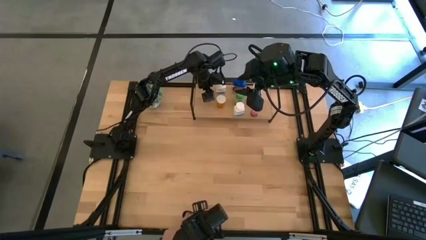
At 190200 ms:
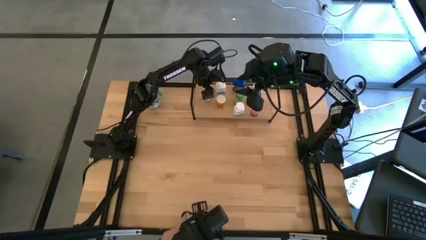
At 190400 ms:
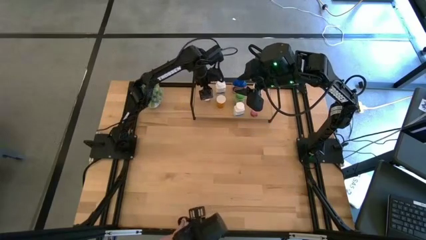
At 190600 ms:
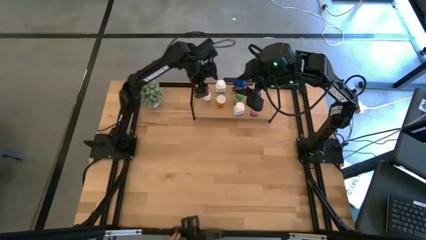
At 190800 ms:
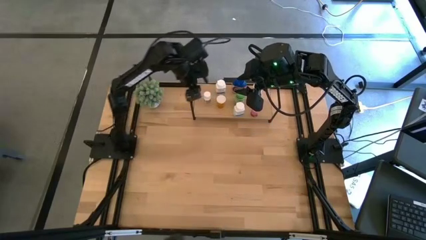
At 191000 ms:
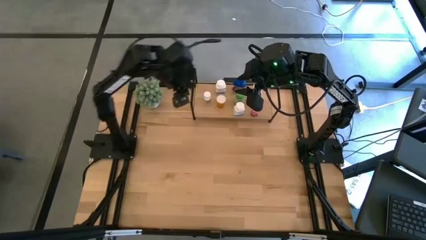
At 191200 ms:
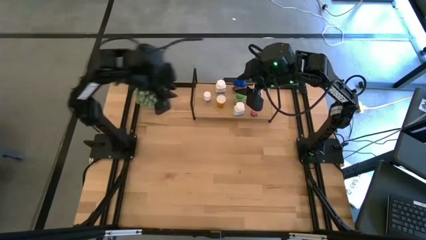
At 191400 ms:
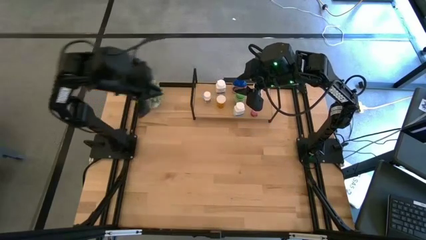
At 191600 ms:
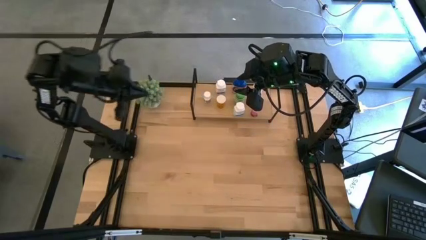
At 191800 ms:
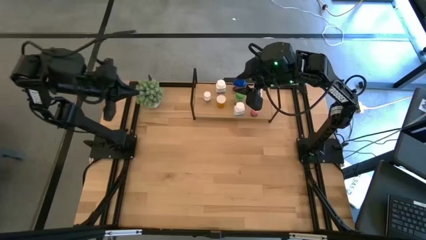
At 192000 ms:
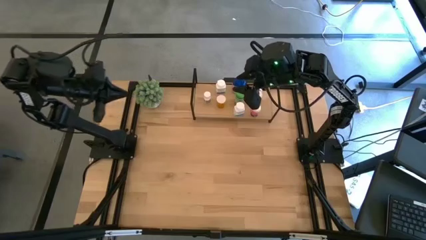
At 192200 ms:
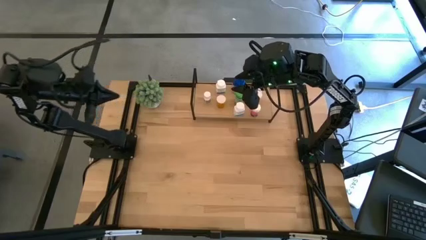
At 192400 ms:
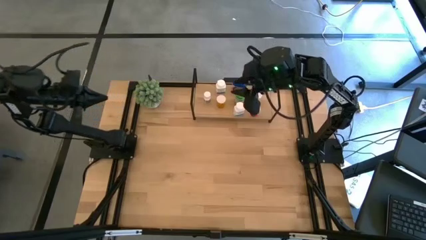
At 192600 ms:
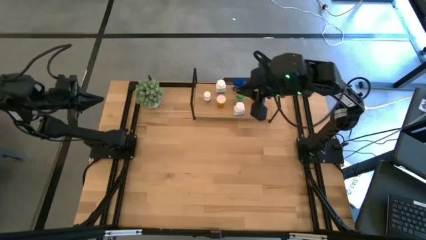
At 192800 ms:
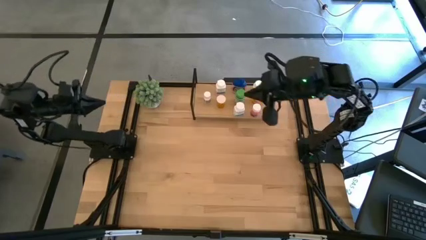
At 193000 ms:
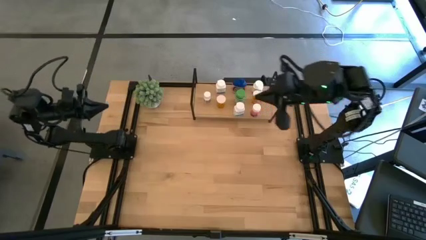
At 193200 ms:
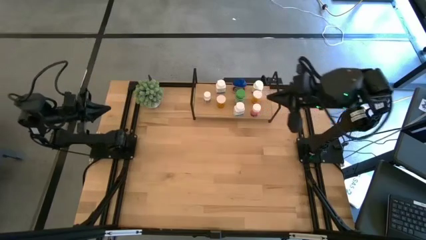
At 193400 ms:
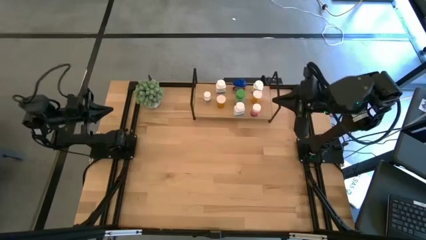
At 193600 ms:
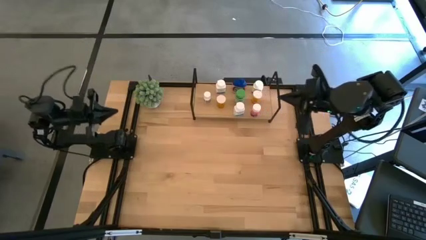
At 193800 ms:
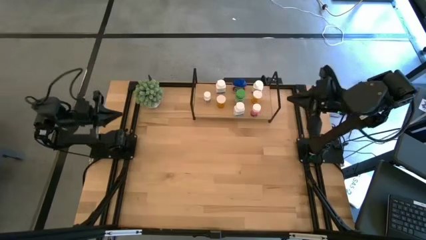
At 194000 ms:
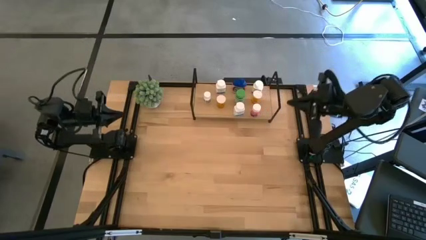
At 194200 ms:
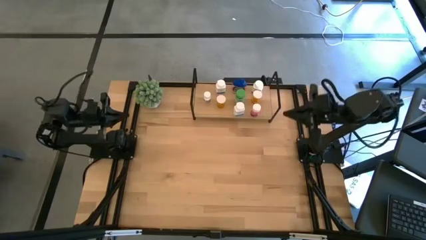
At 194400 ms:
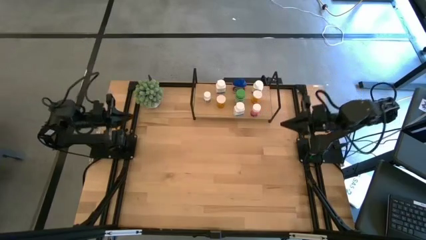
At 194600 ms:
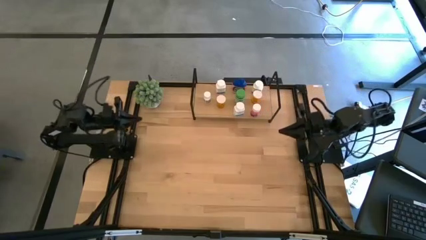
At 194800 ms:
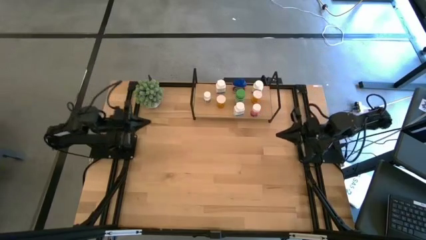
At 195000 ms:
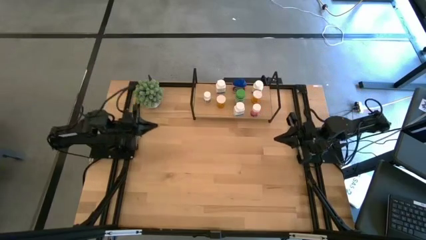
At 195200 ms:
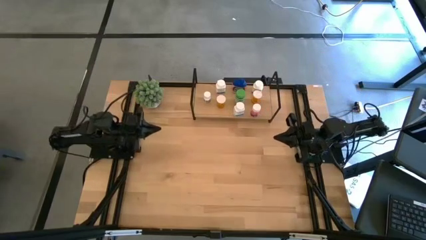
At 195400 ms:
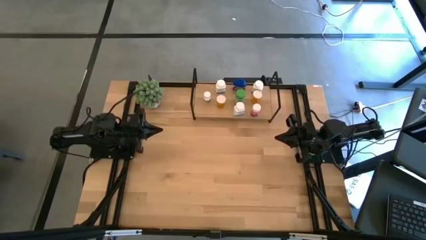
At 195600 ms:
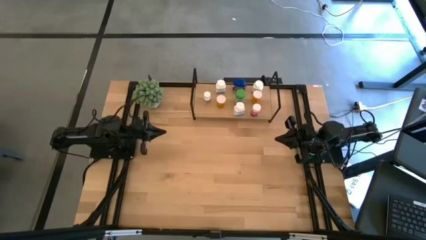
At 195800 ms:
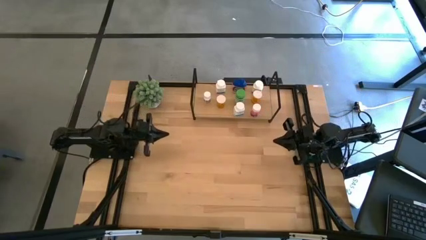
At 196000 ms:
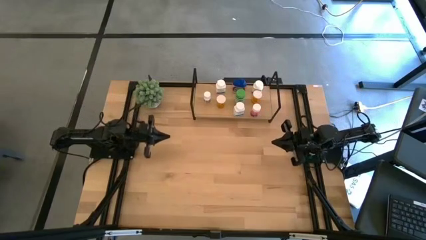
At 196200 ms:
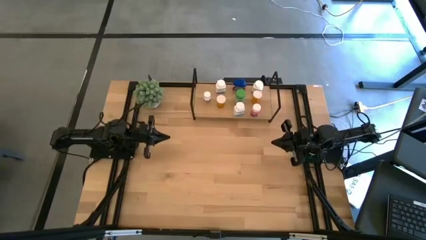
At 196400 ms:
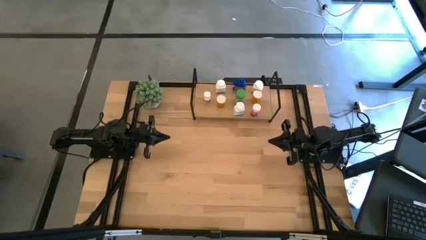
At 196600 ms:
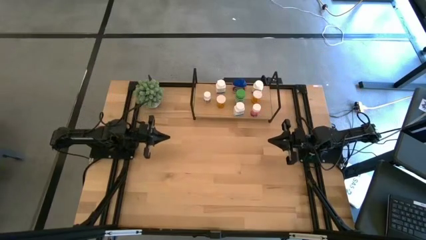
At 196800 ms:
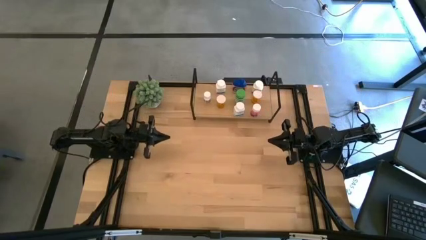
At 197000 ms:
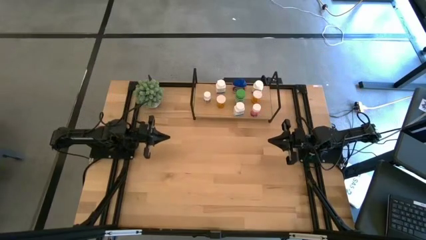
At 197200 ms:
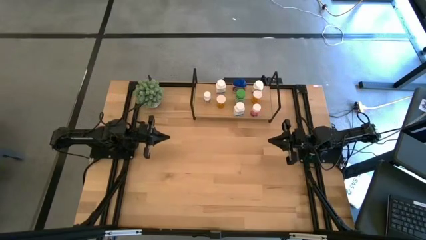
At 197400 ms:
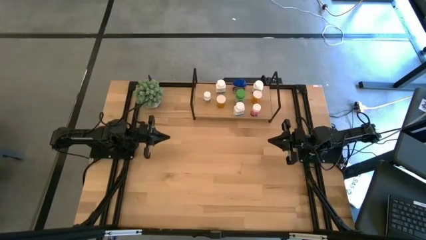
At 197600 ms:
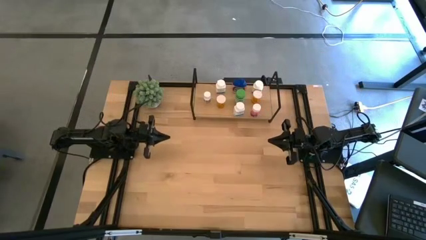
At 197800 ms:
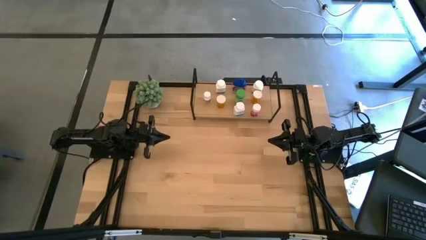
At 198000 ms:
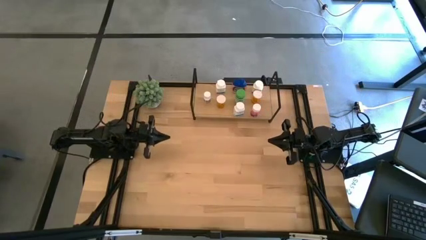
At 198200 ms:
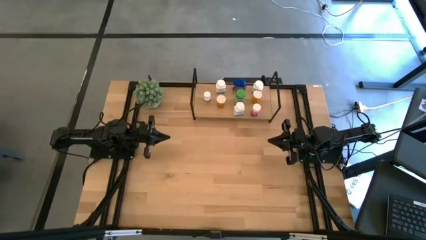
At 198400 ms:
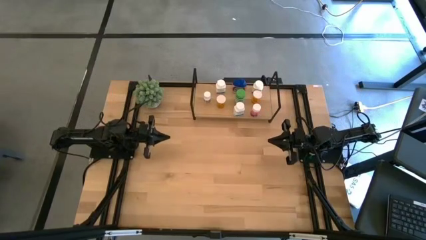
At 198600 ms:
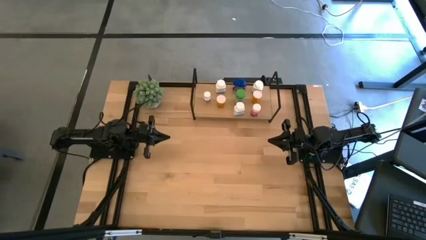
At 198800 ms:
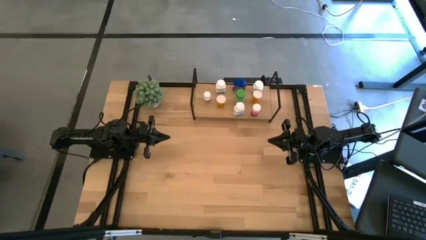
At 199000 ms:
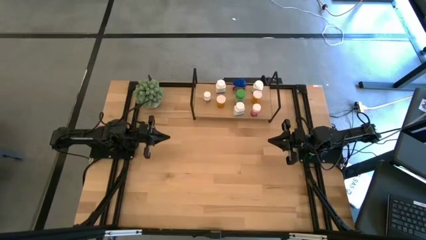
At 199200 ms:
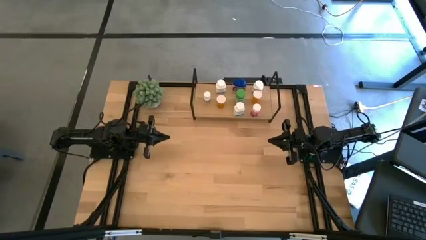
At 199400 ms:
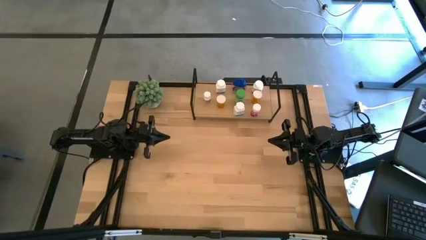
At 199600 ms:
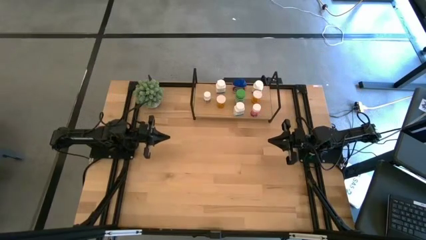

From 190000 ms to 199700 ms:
Task: Pick and place medicine bottles onto shelf by color
Return to Home Position

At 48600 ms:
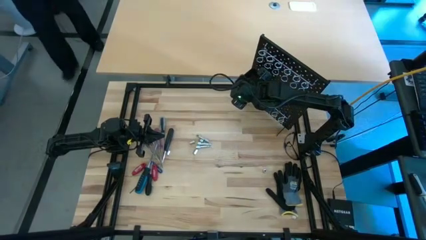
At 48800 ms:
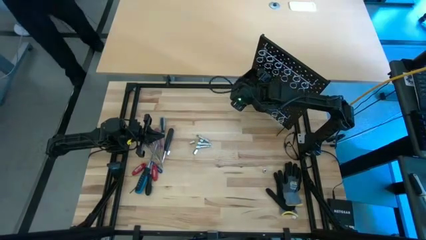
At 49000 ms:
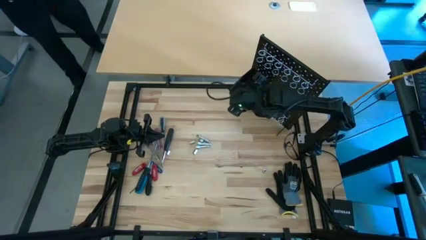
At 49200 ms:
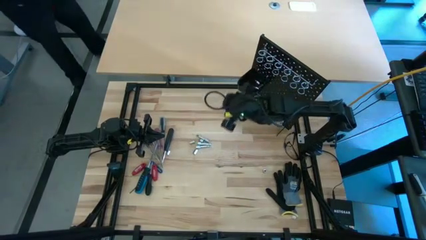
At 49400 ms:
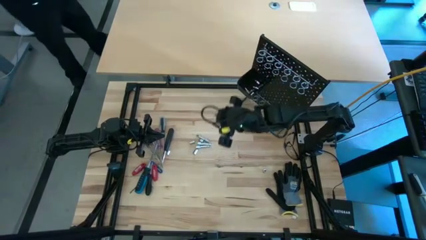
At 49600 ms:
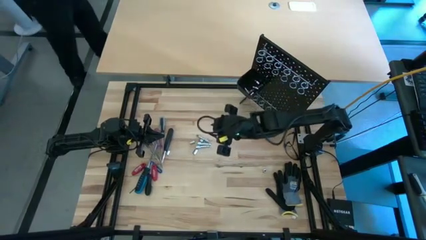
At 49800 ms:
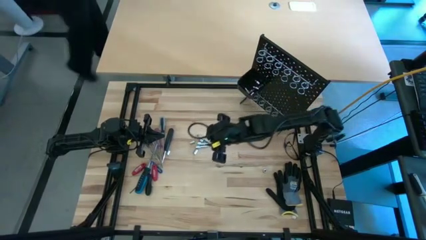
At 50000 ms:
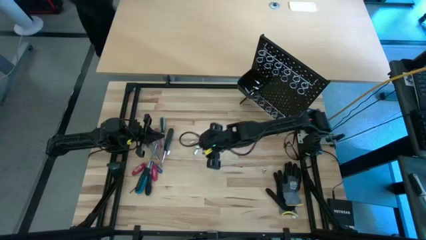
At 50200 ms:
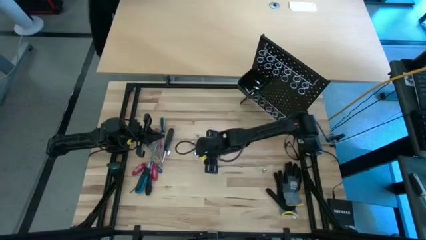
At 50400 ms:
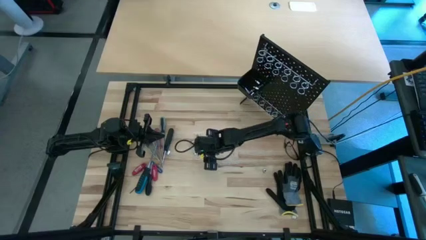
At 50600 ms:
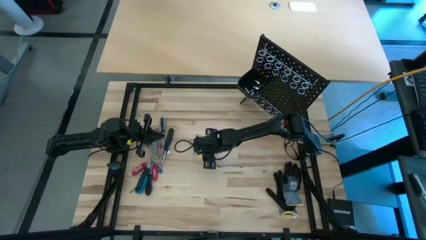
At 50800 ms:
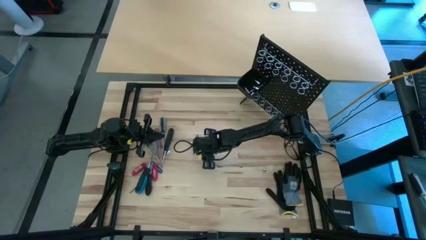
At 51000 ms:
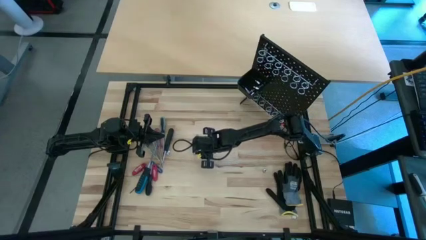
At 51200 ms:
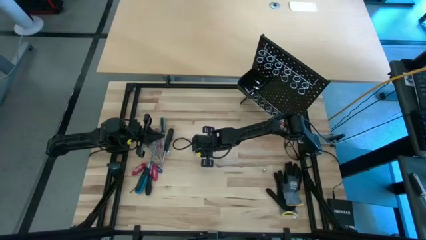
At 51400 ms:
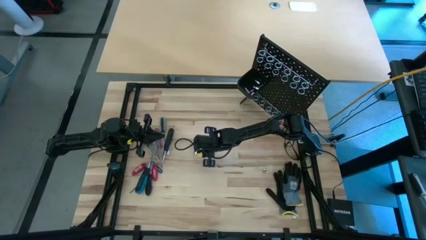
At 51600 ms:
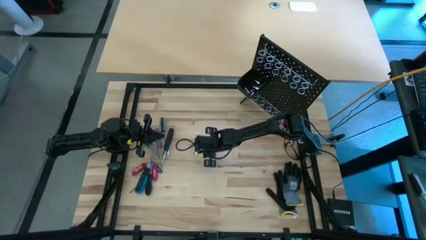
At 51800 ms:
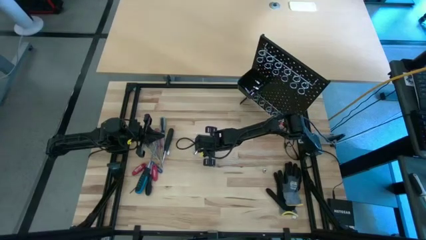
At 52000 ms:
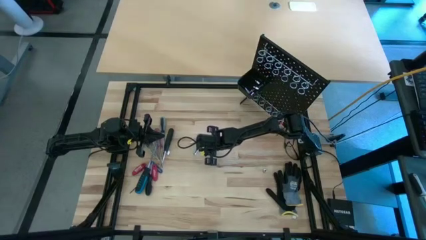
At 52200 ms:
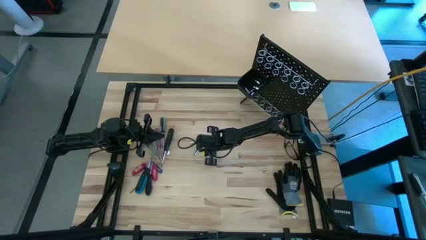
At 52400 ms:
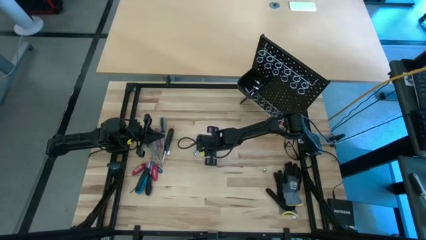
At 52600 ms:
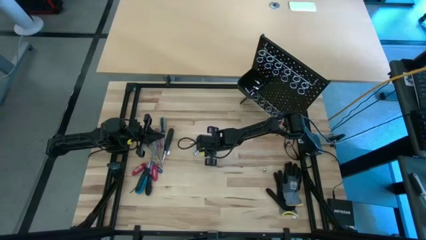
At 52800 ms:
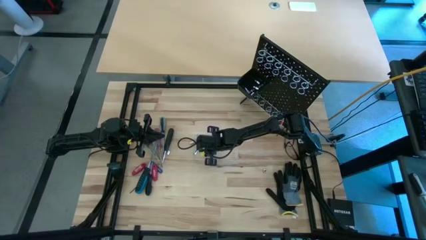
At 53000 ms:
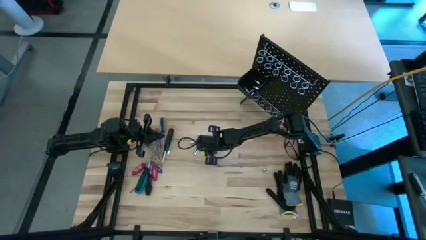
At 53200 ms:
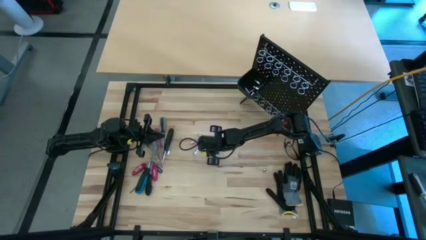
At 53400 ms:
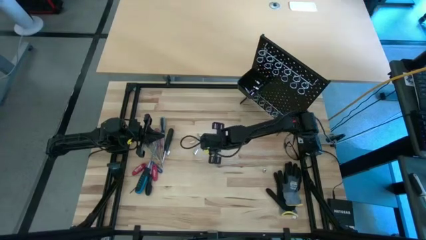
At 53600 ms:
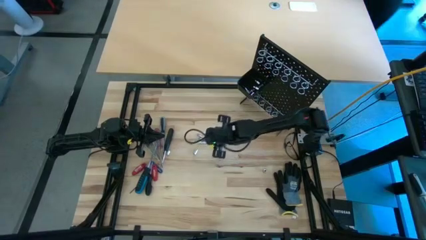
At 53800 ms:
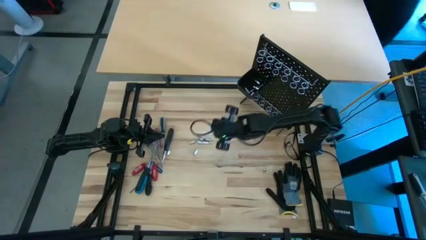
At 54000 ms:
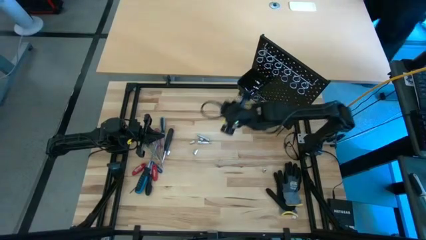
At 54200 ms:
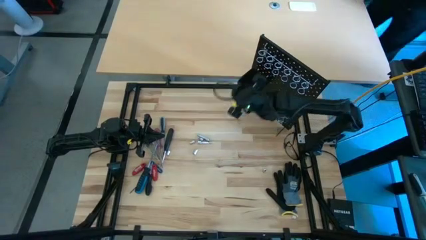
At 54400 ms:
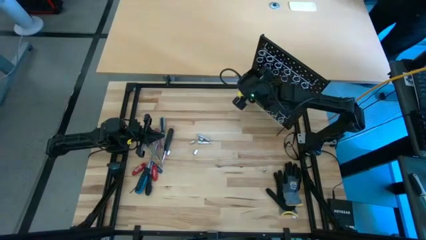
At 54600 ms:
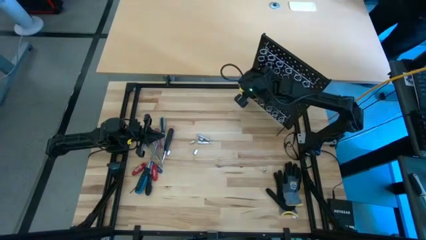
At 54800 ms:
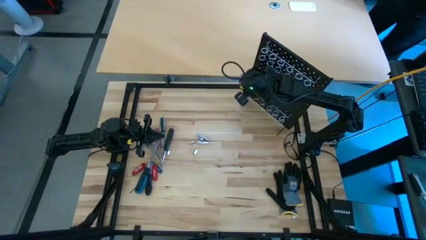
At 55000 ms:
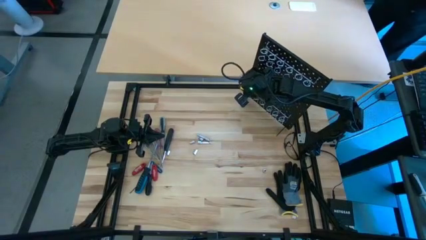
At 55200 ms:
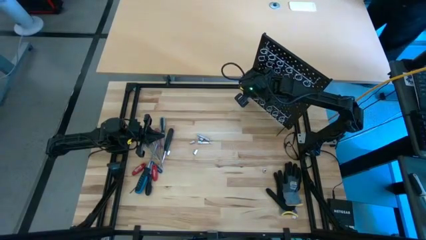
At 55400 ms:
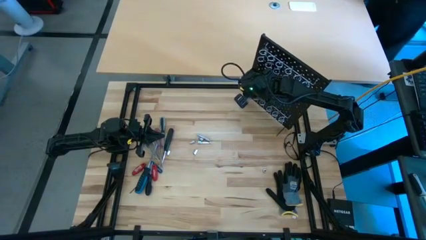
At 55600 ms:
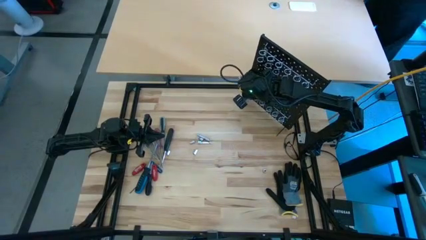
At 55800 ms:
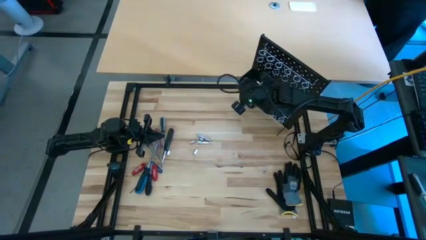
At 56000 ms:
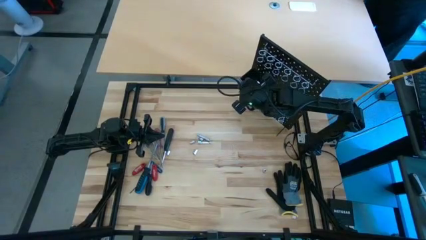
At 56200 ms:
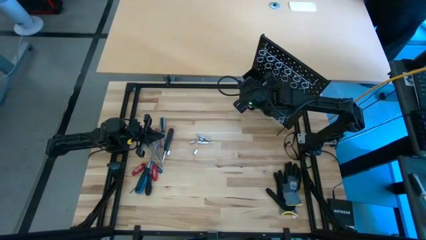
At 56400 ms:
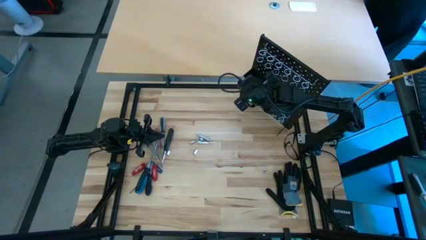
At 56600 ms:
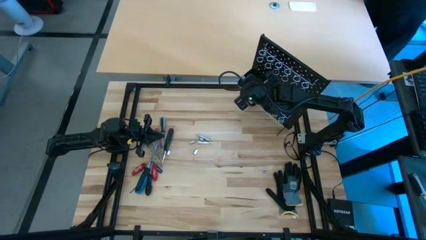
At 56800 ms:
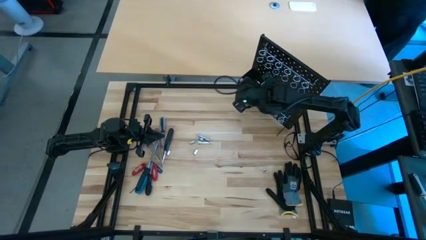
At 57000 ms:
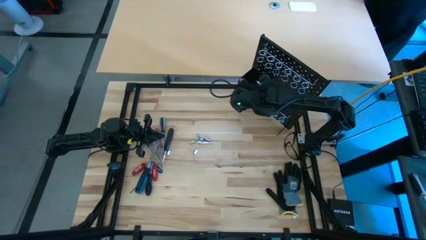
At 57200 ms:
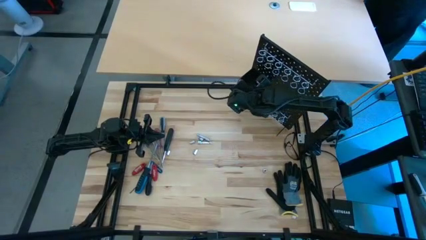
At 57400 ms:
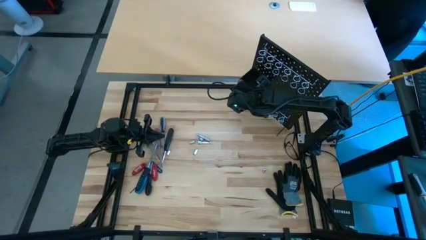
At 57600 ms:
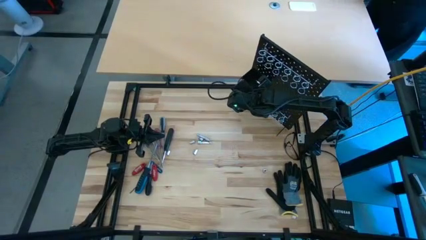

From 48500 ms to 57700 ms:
Task: Hang tools onto peg board
Put the extension bar into the black pegboard bin
